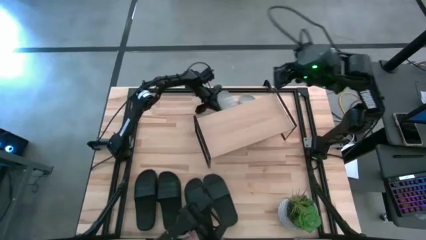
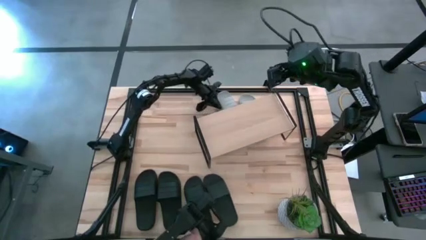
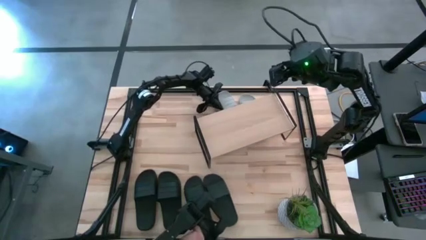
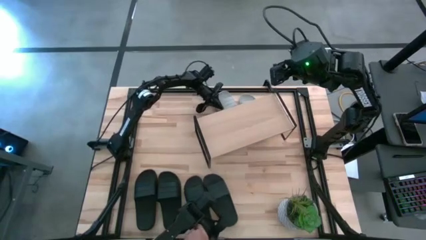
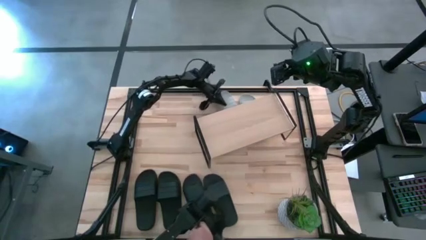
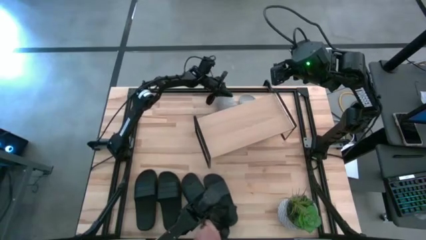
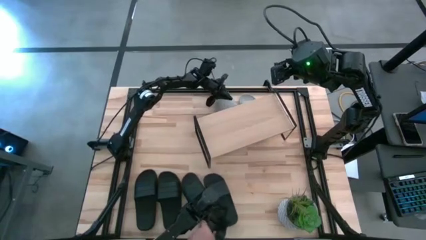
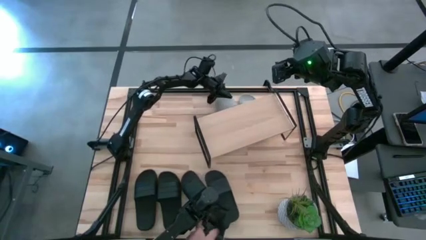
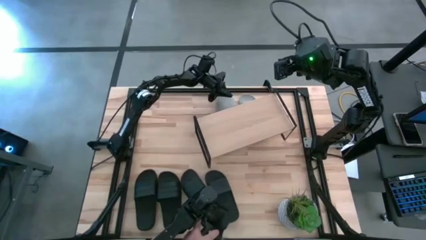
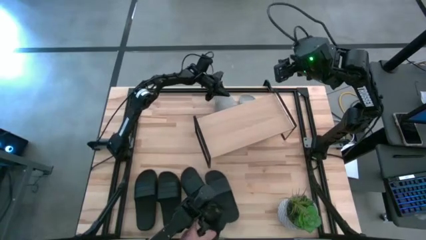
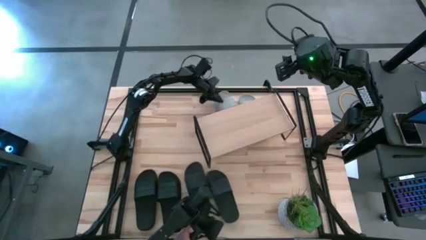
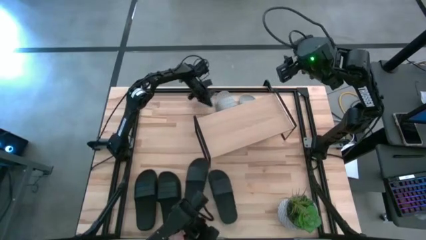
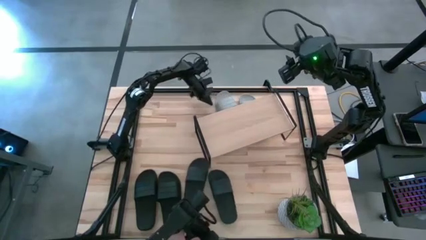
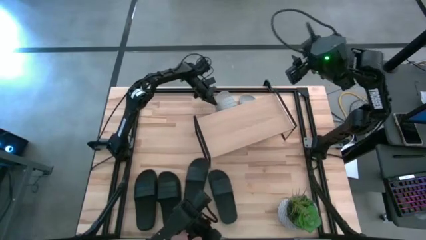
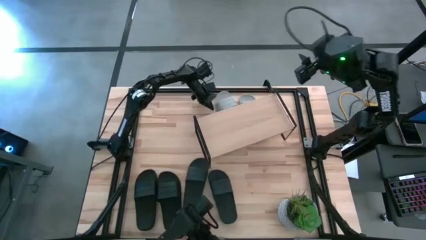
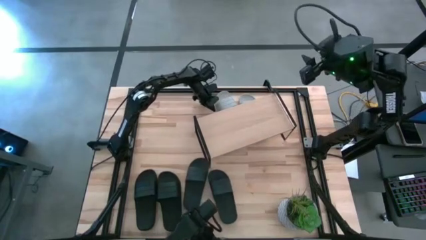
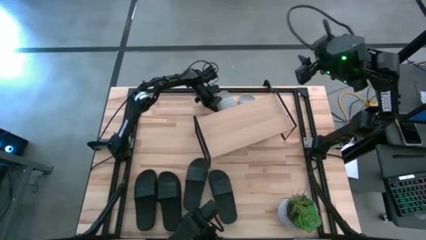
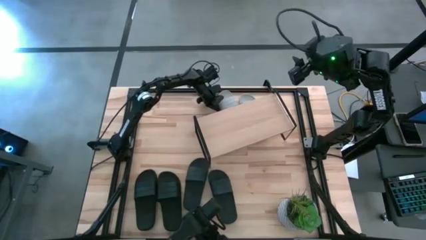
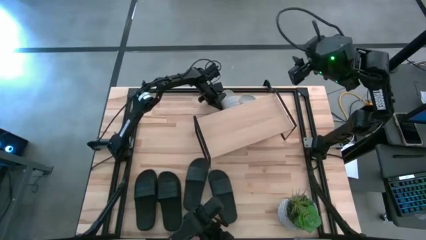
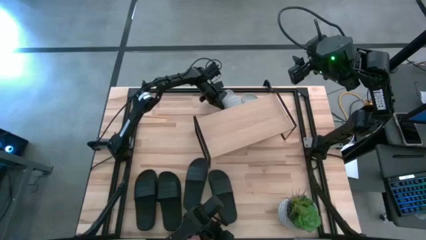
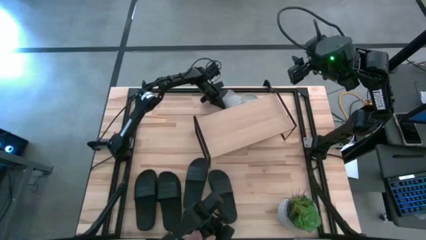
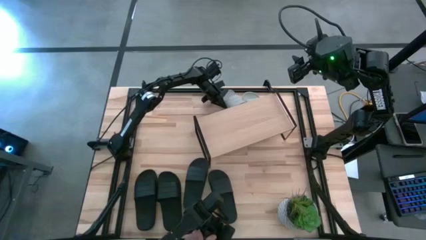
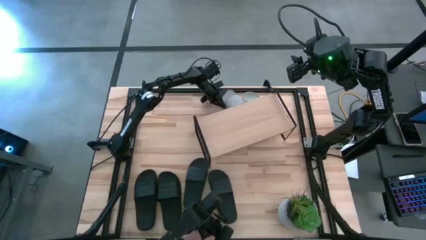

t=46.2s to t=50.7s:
Task: Pick and place slides into the shelf
Adjust the left gray slide under the shelf

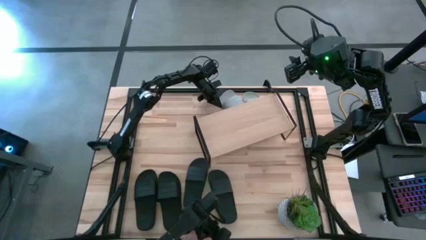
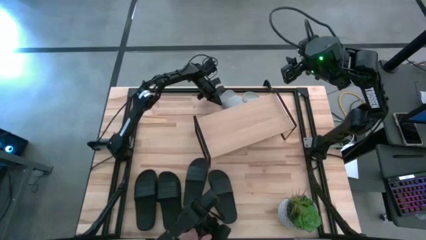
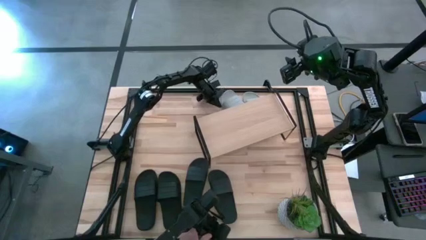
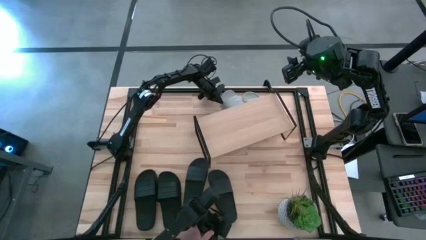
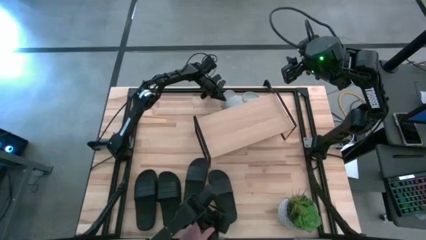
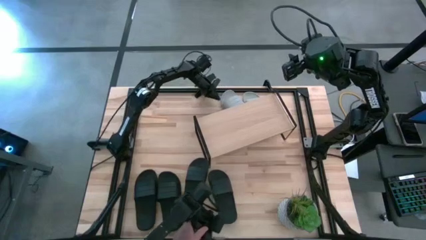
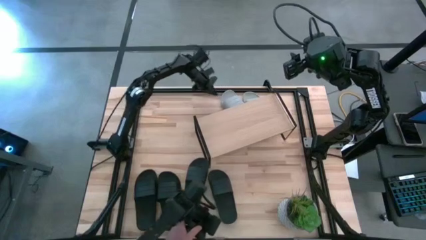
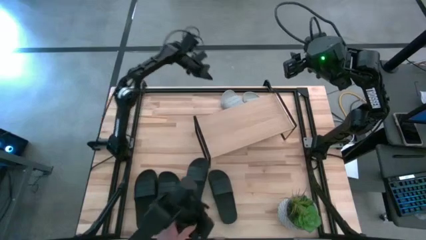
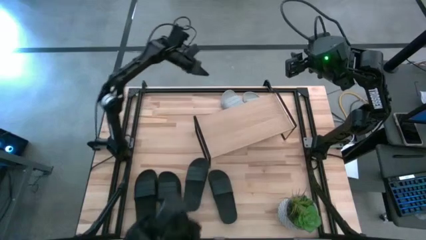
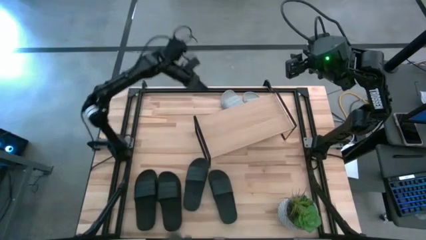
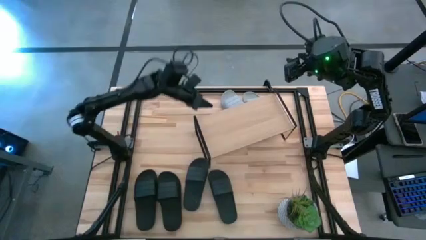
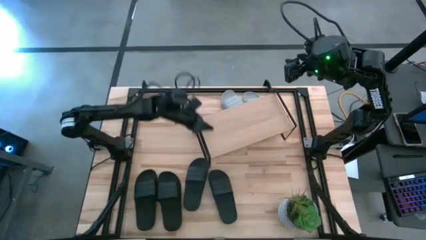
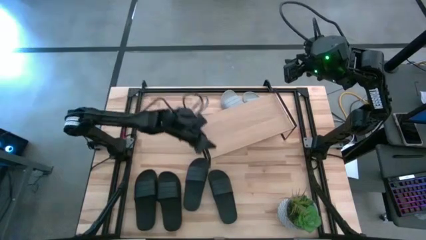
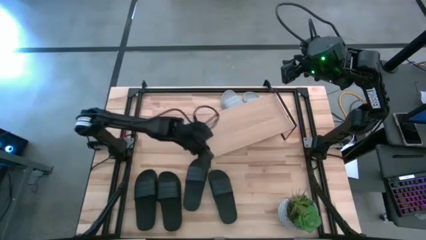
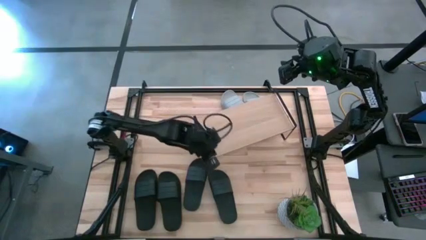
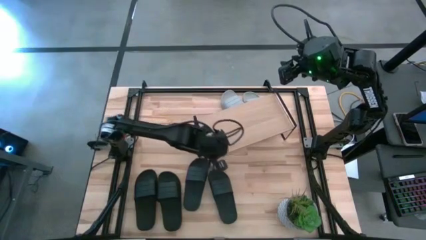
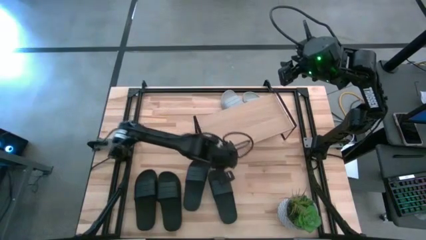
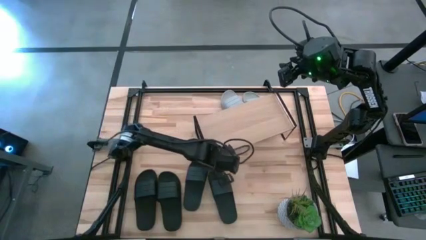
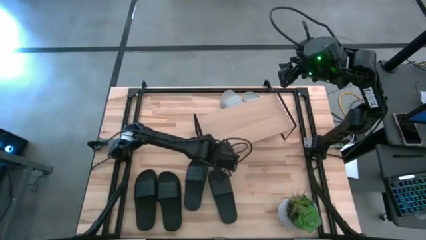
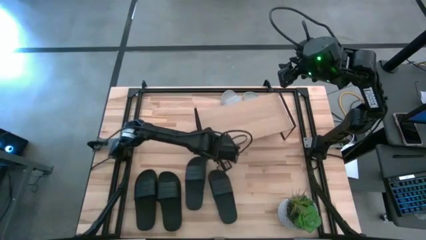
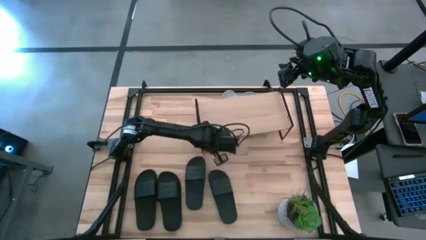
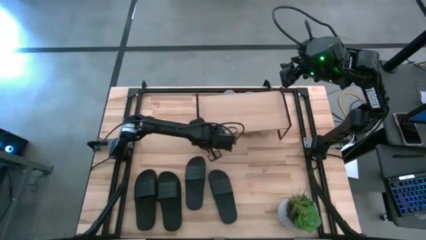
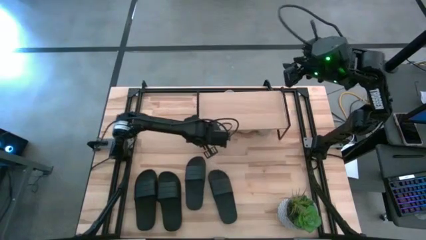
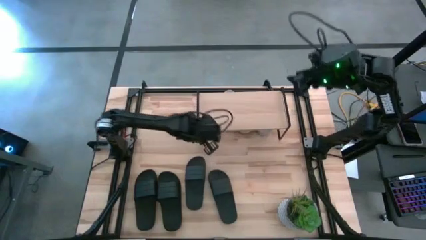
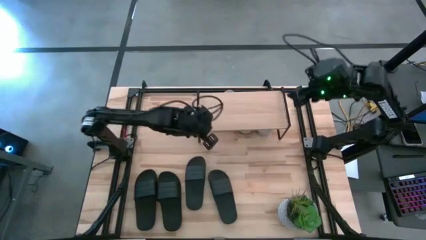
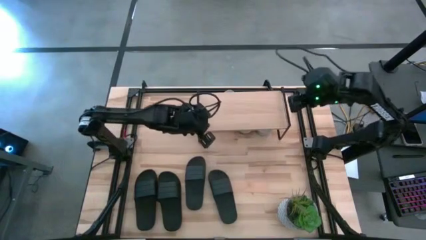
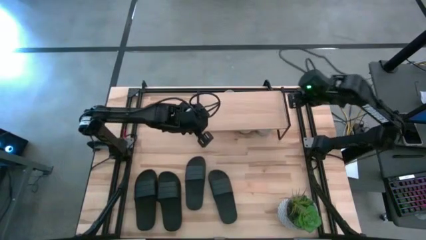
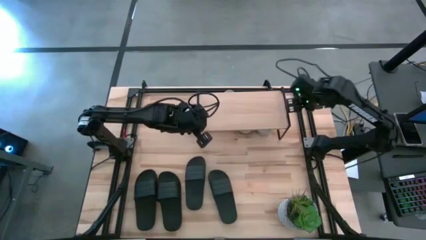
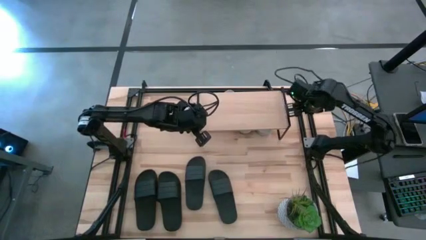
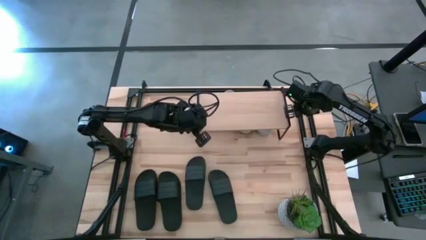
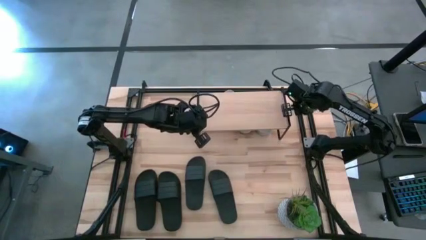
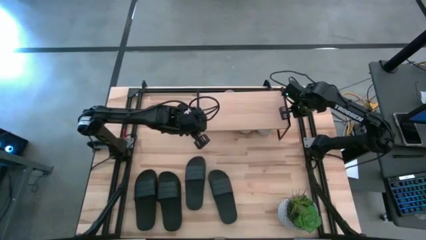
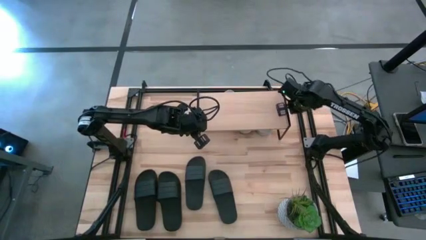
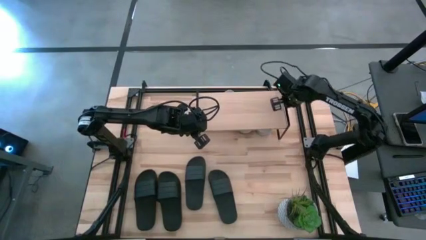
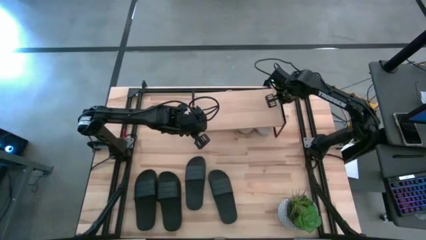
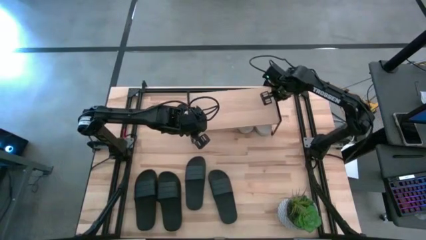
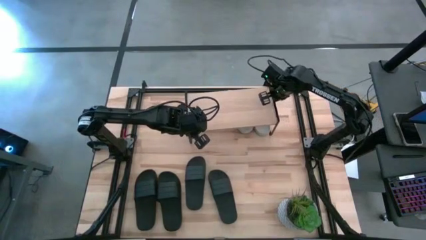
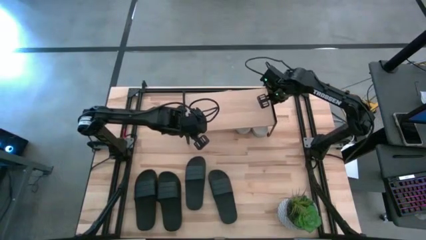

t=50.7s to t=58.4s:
Adjust the shelf on the table

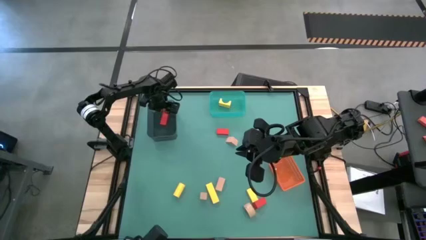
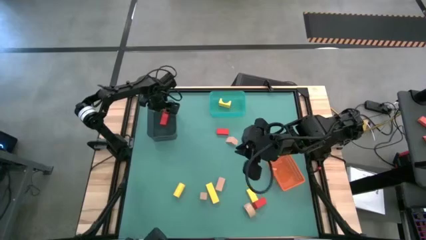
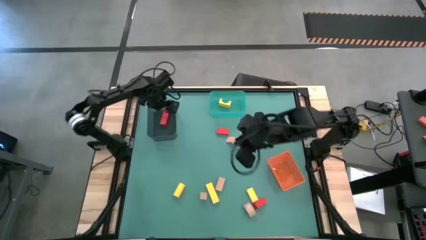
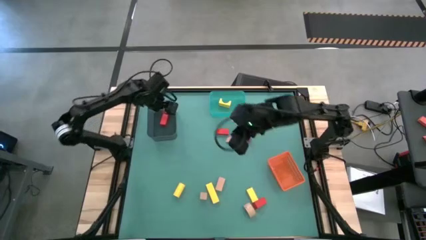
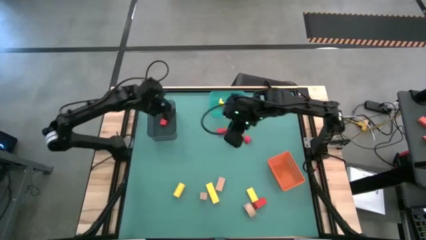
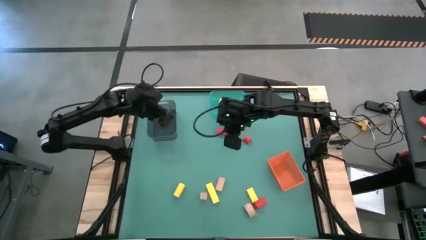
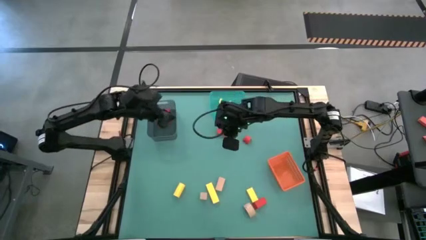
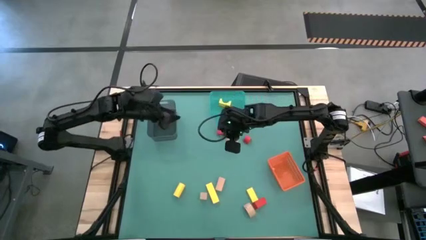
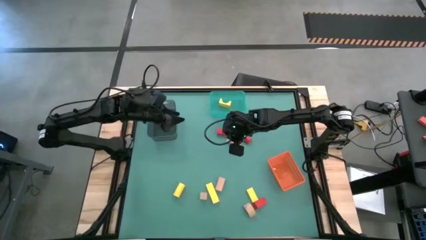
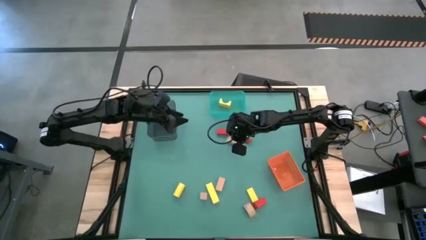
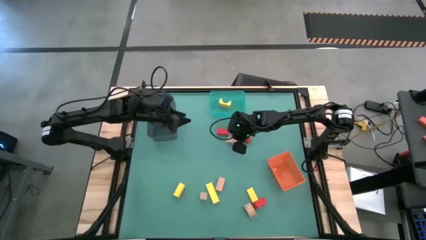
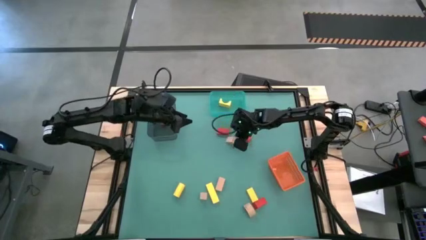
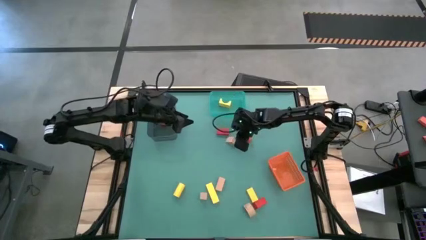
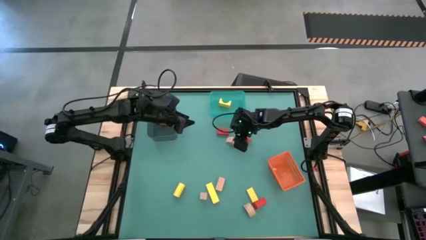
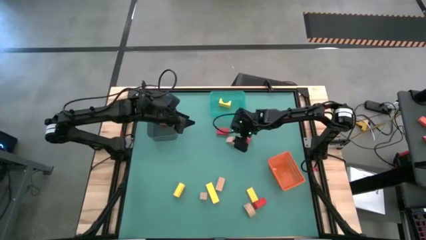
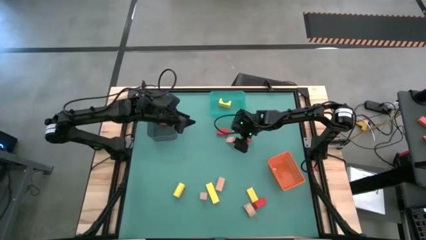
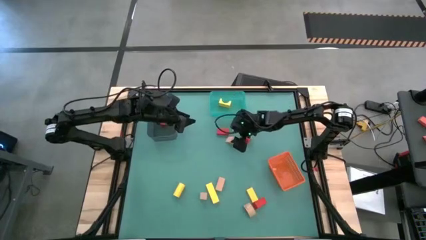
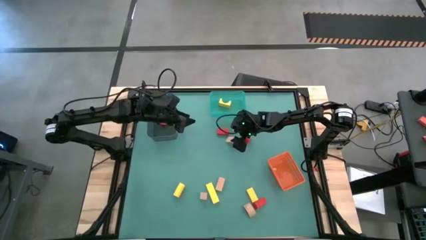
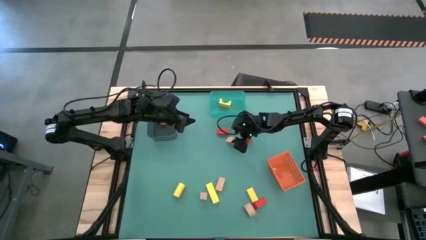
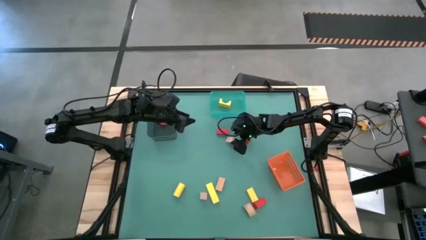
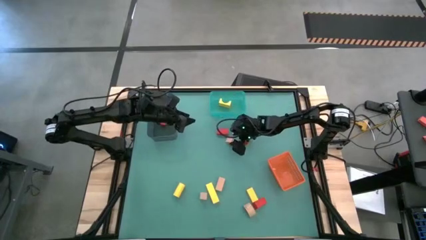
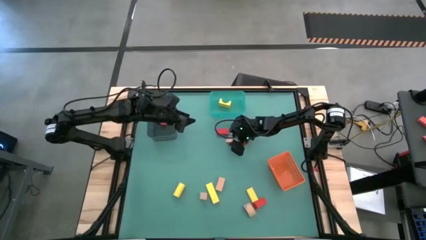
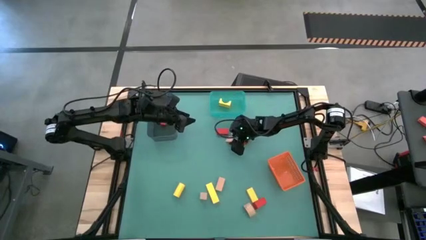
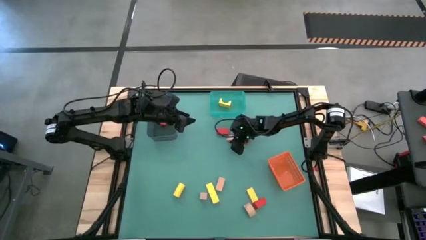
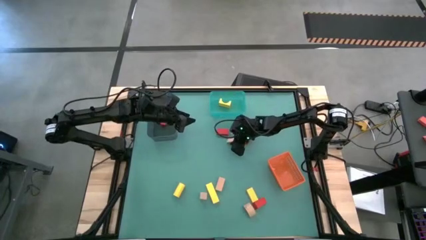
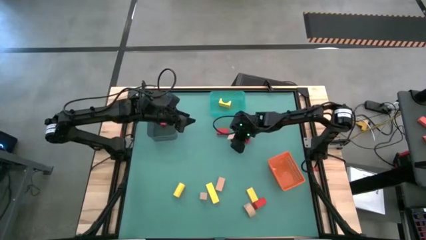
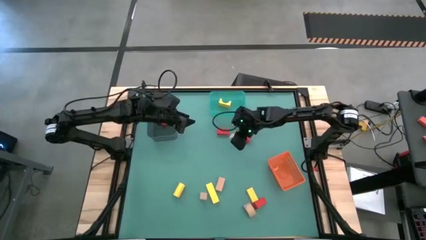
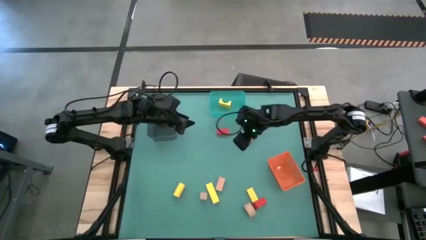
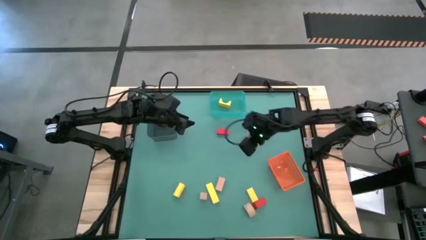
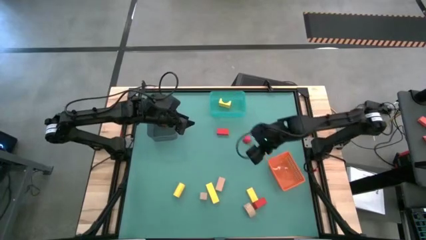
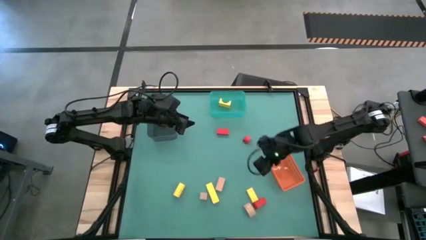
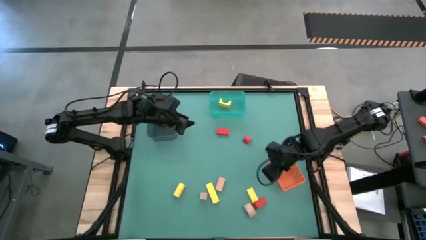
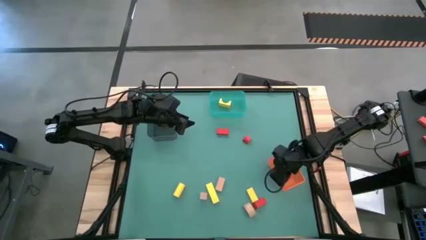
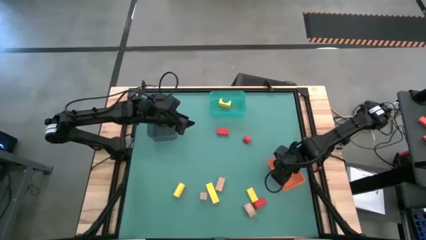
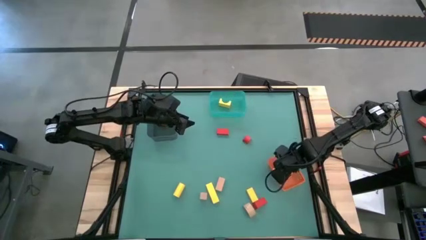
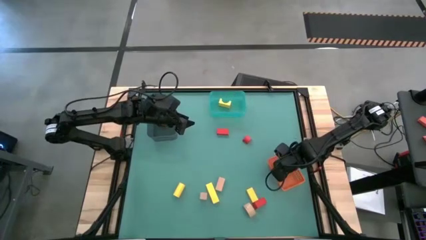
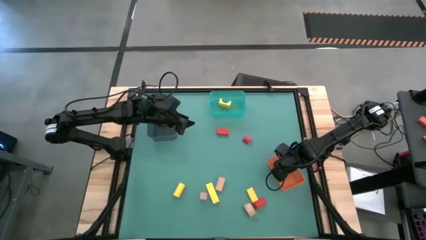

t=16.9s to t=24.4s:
Task: Sort & place blocks by color
Put the light brown block into the orange bin
